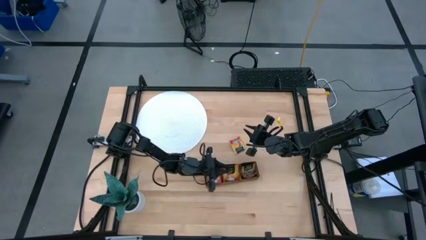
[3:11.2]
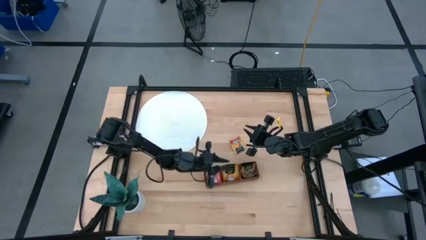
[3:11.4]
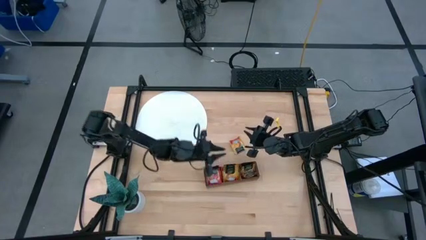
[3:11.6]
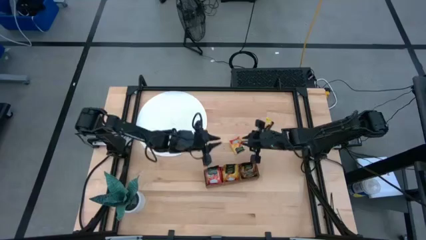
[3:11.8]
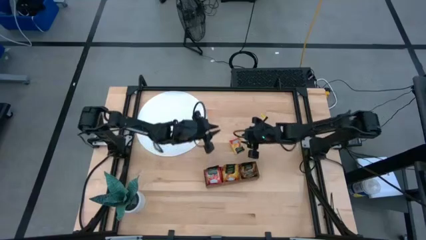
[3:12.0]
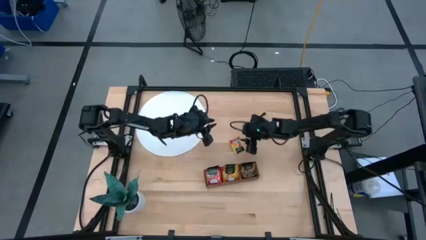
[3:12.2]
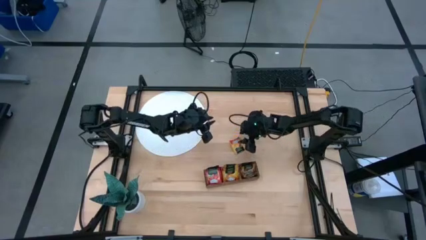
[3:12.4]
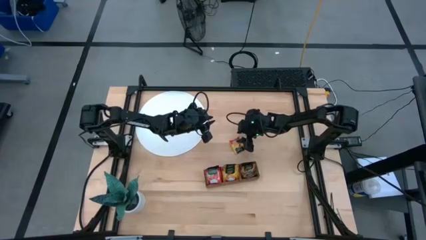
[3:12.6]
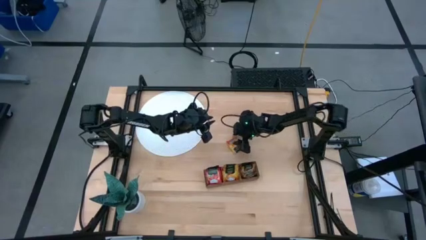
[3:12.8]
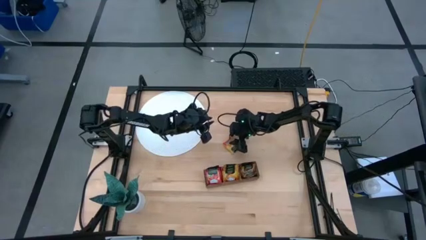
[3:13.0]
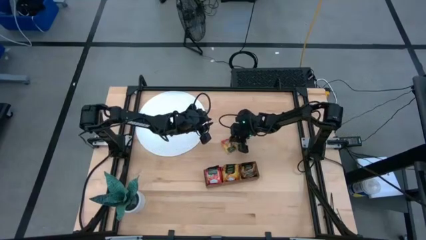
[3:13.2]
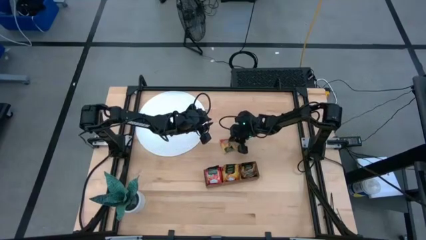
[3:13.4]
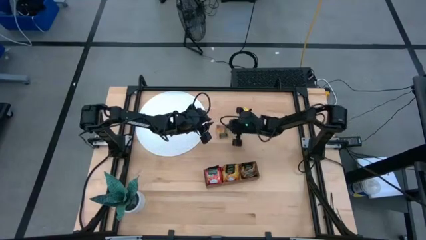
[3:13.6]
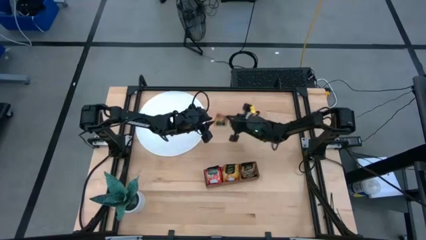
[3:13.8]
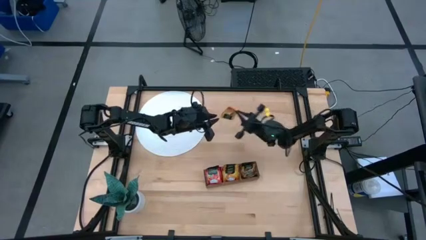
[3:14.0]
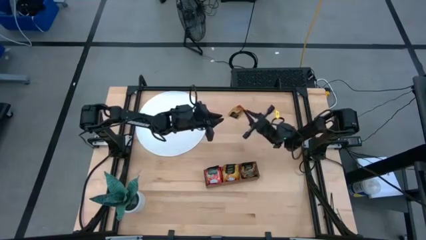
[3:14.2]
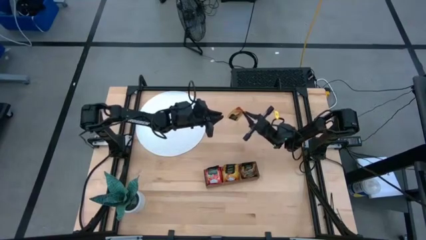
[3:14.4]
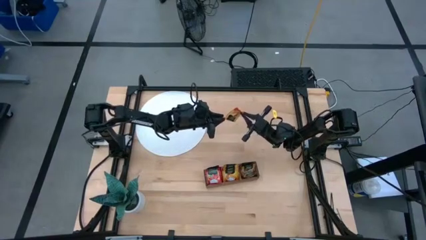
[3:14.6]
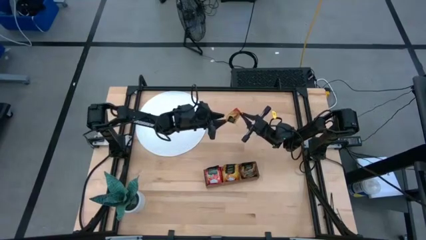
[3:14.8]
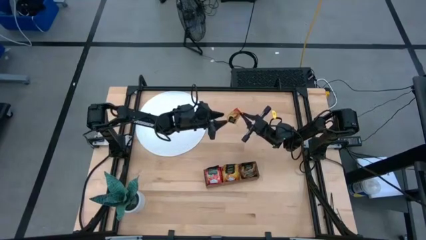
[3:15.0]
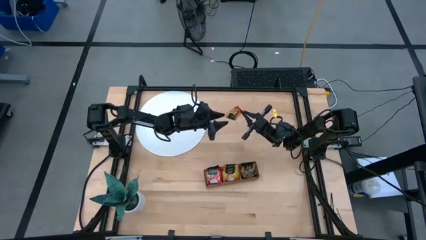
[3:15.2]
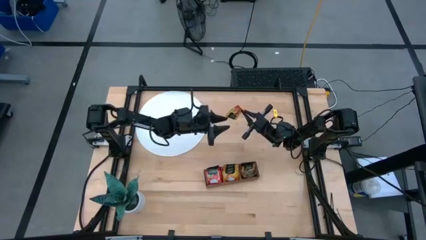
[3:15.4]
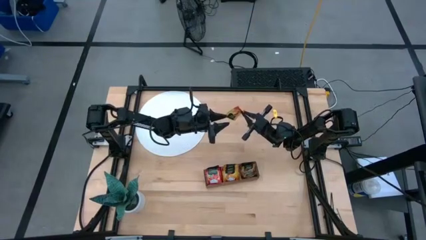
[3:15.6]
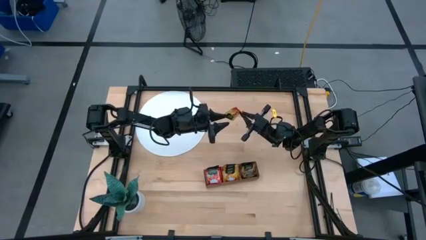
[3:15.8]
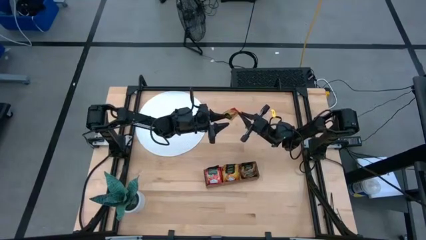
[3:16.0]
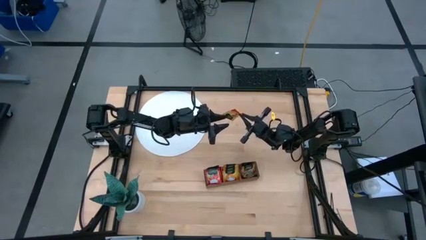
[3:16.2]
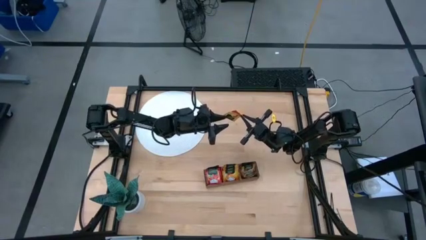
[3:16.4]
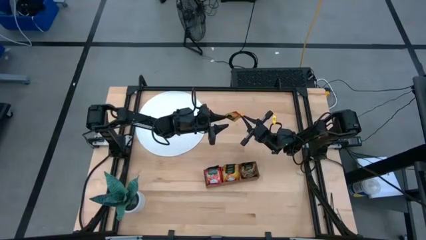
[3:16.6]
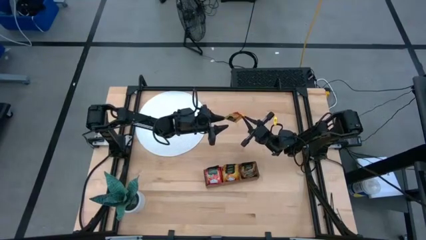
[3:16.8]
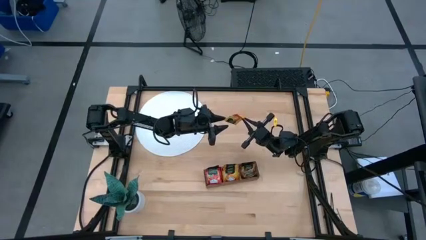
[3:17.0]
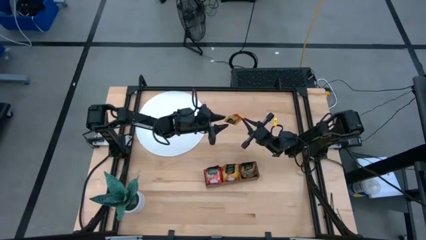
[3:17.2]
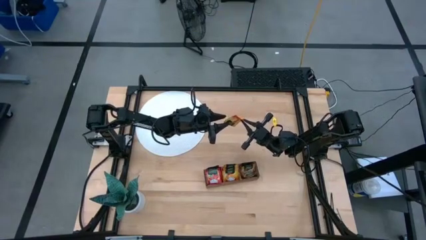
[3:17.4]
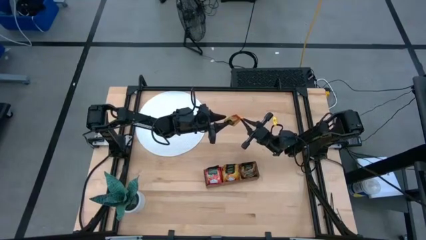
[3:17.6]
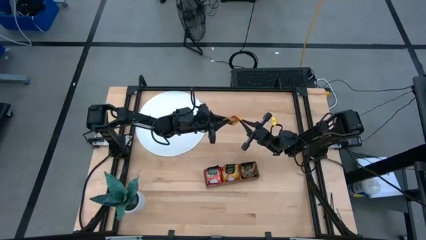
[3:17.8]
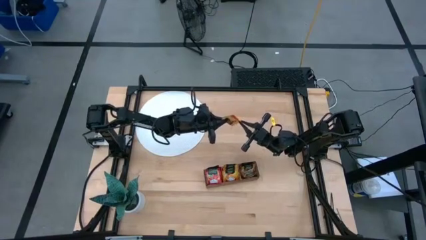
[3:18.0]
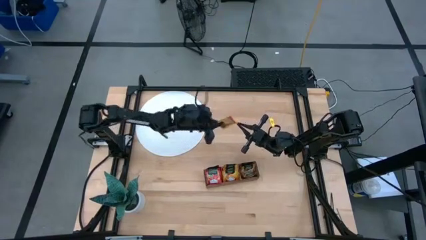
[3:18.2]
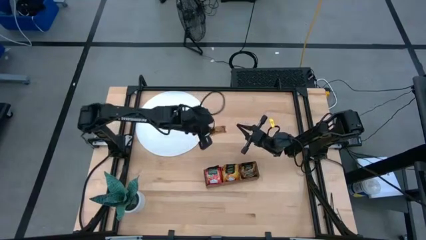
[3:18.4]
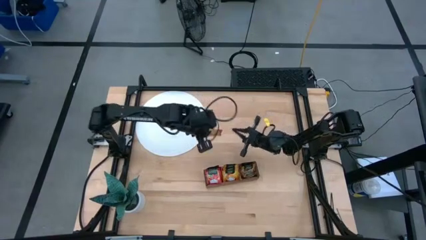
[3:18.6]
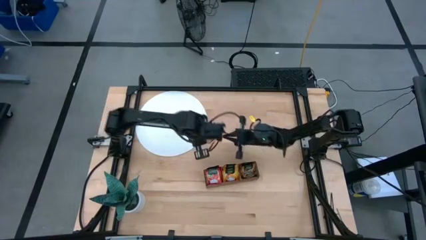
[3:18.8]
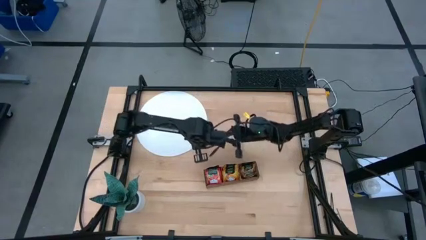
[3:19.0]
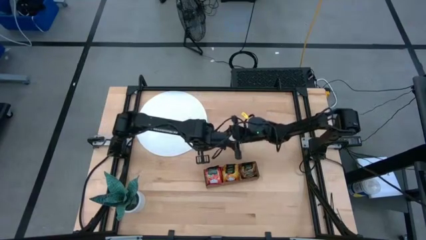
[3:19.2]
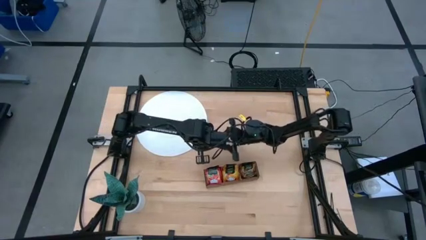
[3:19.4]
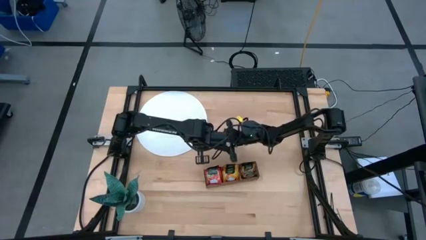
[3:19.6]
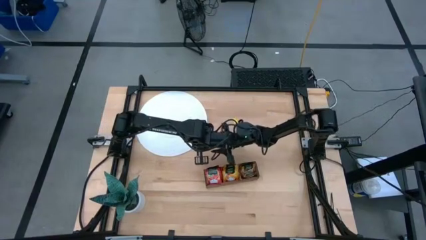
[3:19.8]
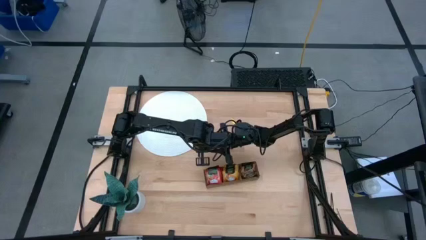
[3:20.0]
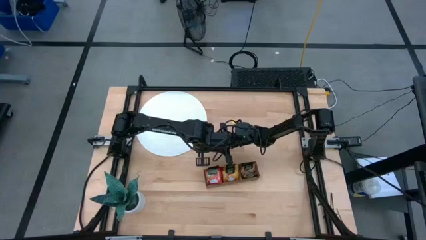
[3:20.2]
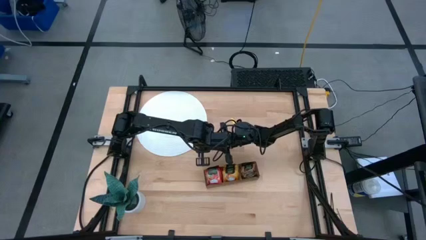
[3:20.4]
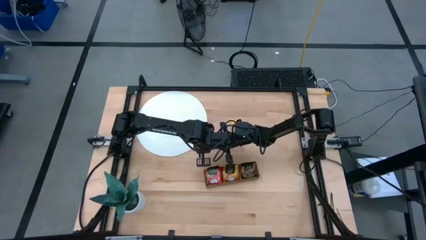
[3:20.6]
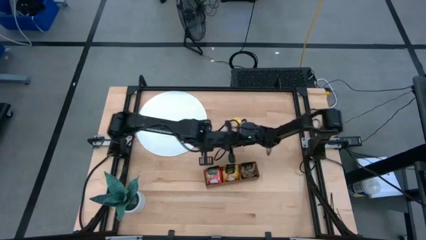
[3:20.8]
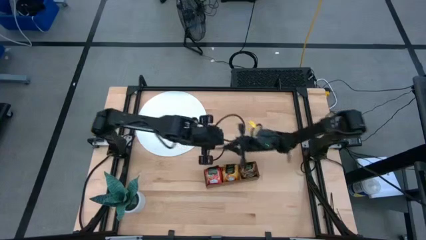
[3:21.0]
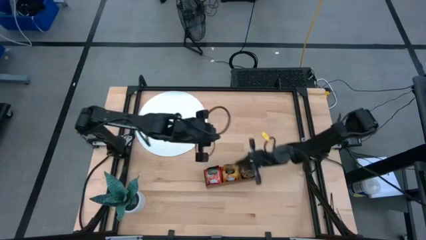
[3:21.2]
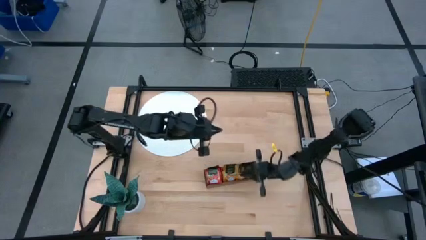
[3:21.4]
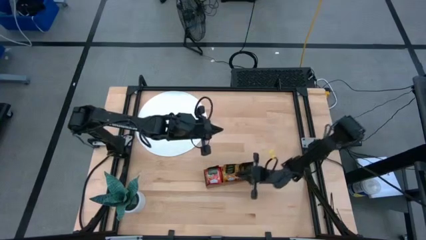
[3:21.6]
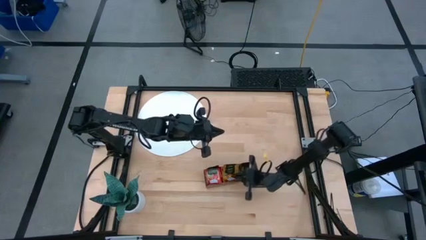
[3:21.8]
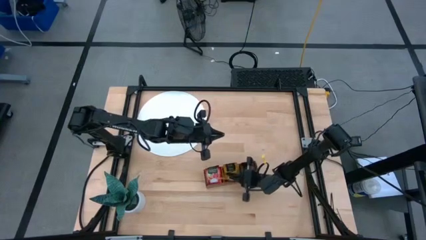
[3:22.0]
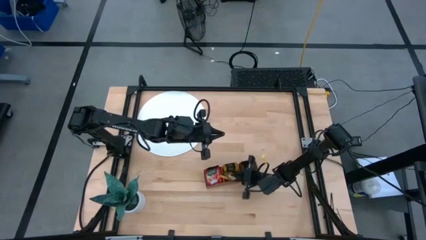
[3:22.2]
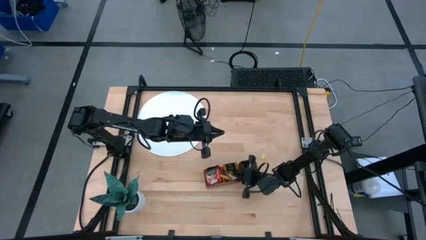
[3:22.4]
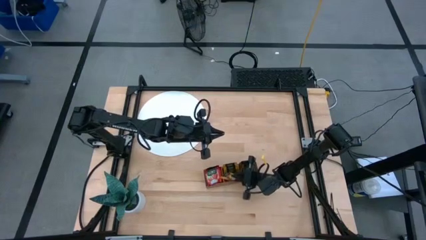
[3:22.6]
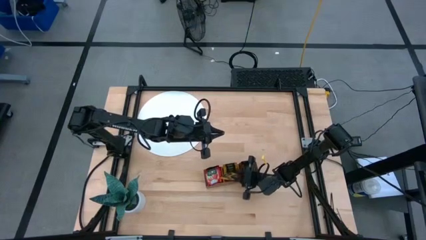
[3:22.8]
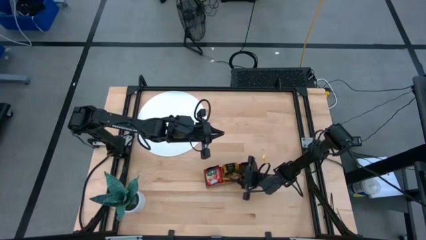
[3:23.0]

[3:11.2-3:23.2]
Task: Pick & Place Tea
Put the orange tea bag into the middle section of the wooden organizer

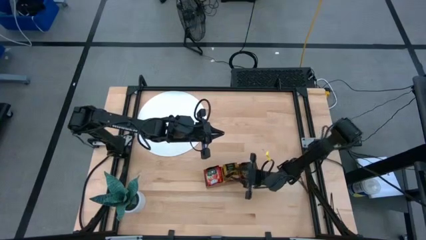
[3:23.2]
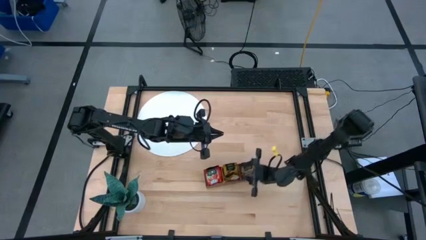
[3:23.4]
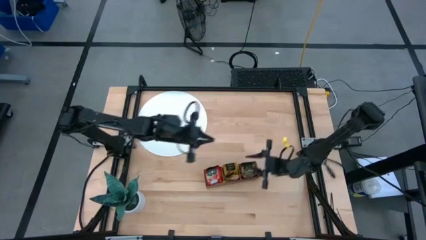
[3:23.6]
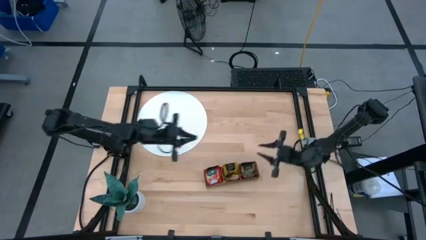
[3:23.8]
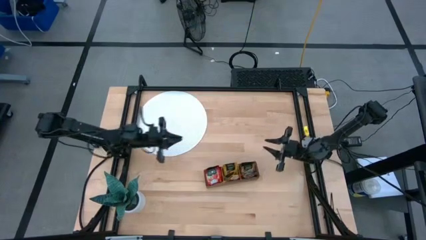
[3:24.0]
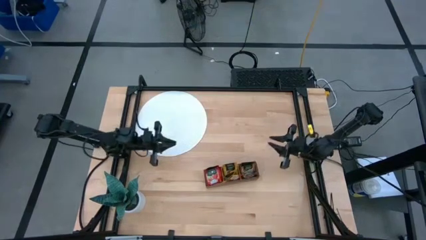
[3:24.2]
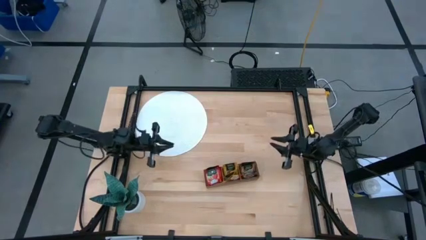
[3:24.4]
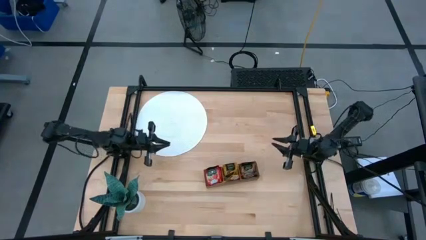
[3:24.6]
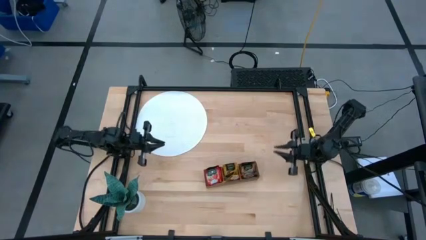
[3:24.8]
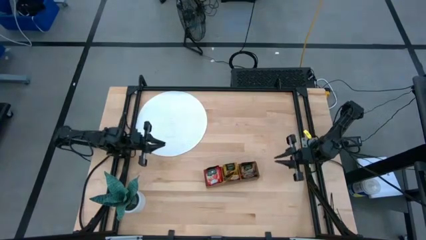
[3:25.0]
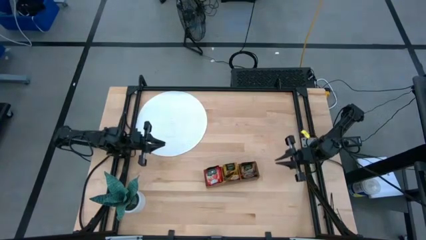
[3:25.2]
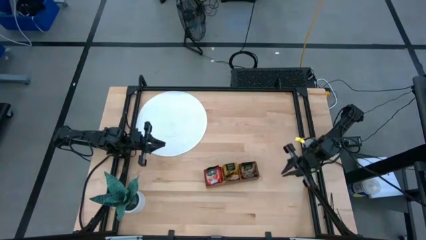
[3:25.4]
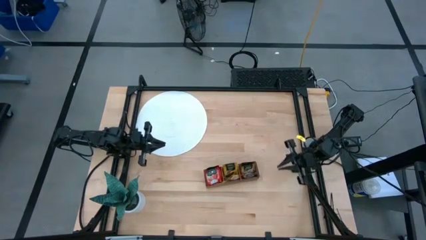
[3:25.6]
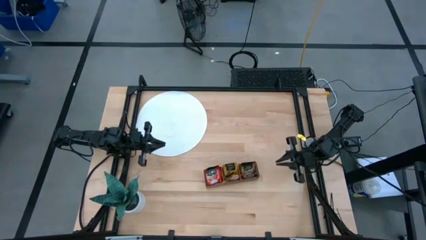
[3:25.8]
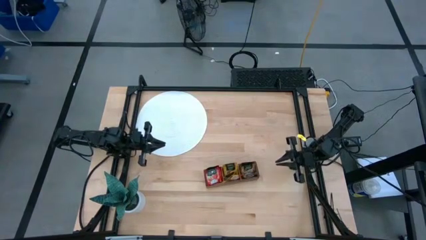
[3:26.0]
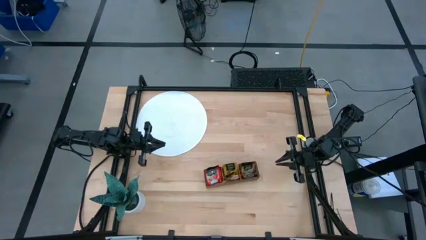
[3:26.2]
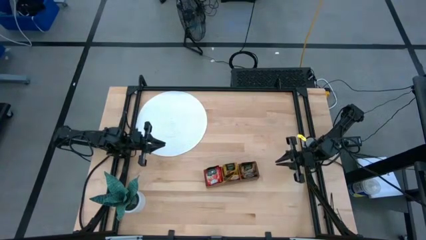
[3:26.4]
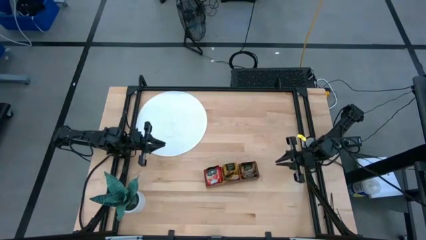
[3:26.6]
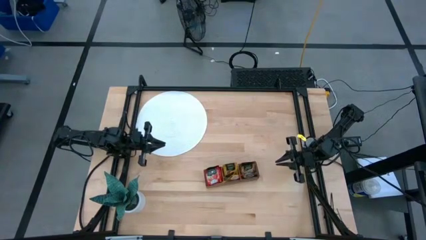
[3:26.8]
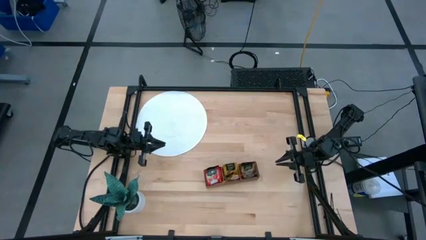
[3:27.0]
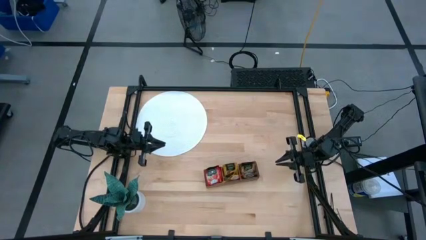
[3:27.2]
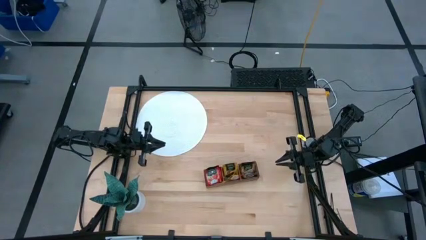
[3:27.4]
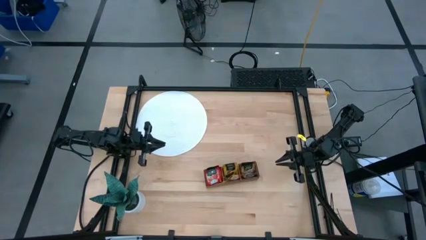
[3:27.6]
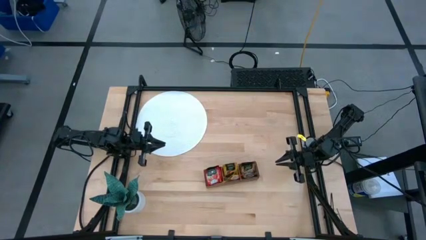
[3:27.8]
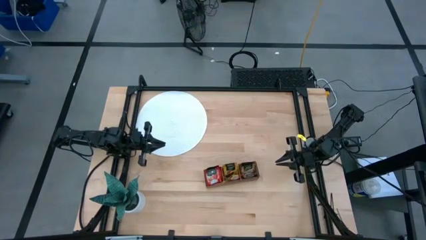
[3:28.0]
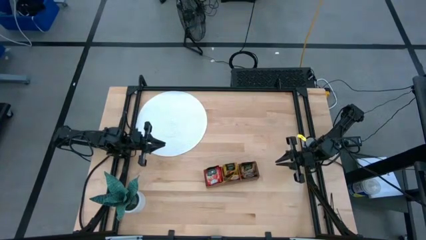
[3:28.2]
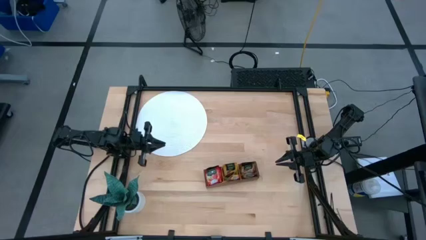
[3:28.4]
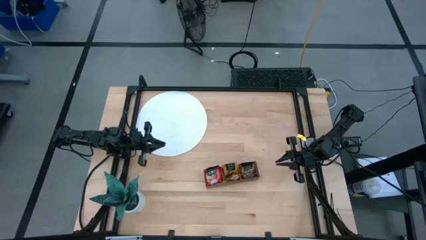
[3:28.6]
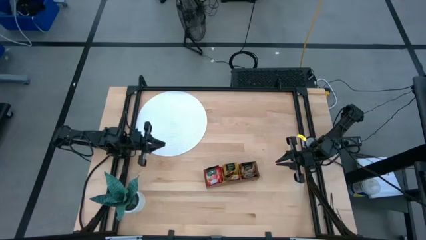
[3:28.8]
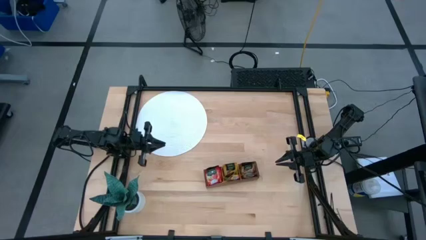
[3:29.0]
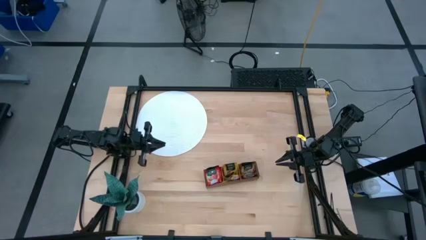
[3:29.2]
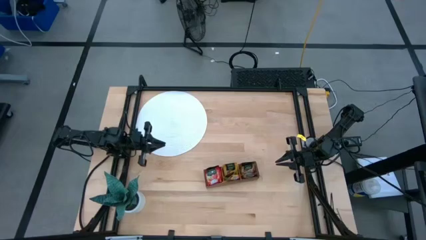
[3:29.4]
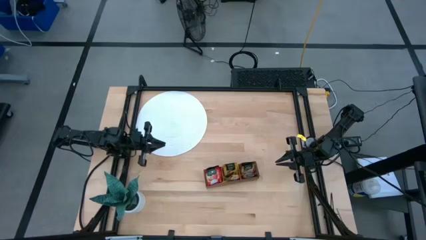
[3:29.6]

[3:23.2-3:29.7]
Return to Home Position
